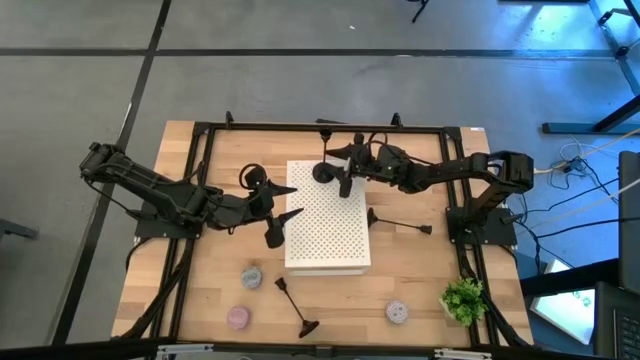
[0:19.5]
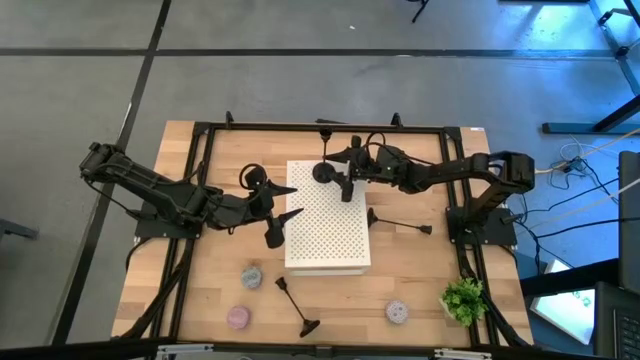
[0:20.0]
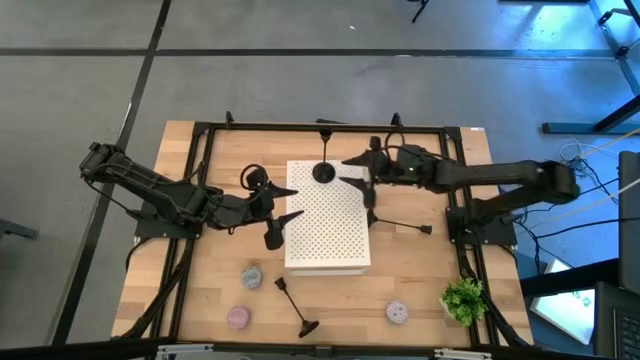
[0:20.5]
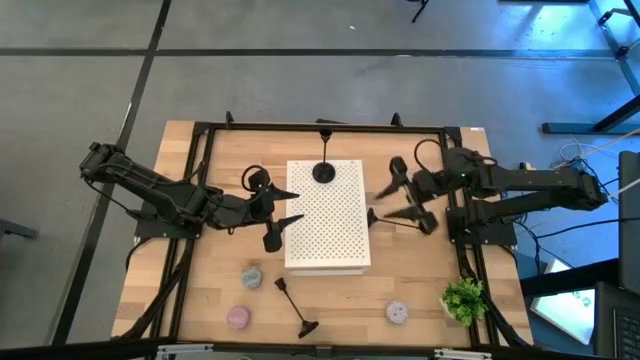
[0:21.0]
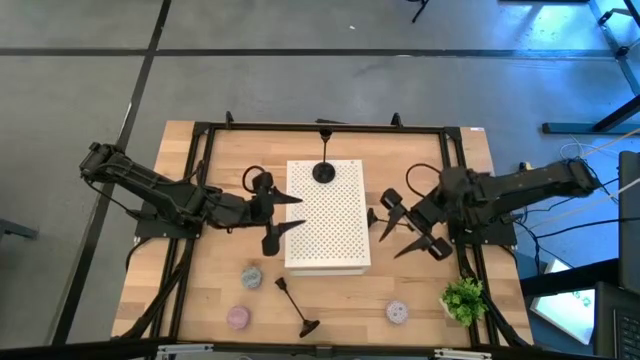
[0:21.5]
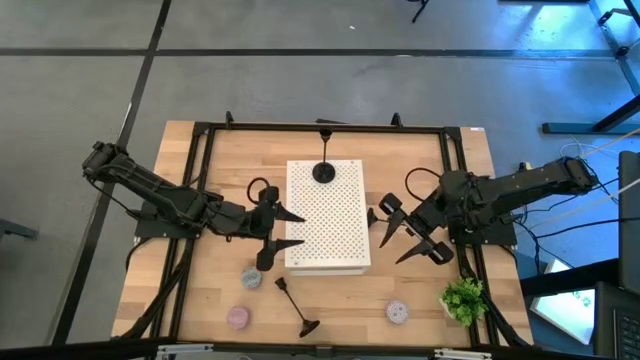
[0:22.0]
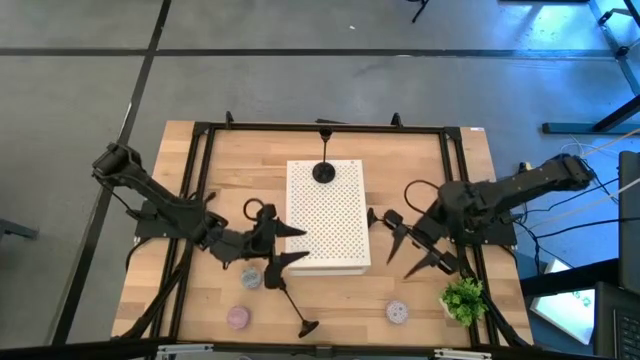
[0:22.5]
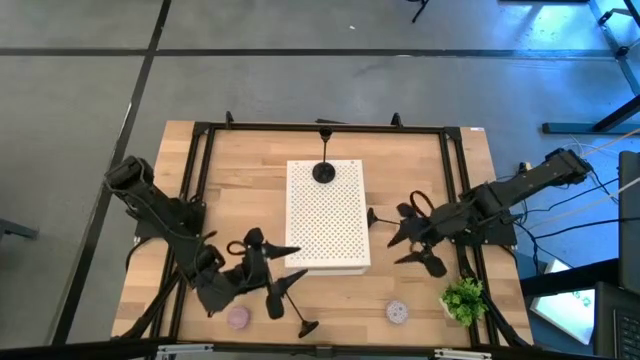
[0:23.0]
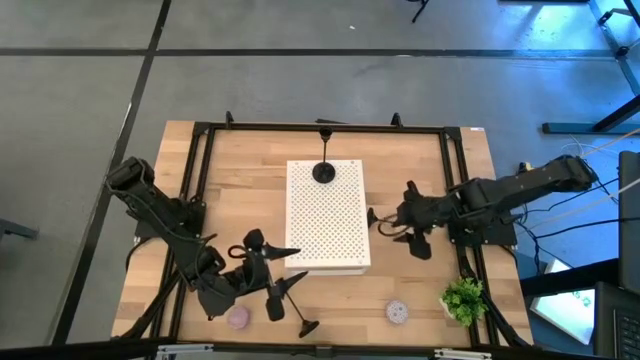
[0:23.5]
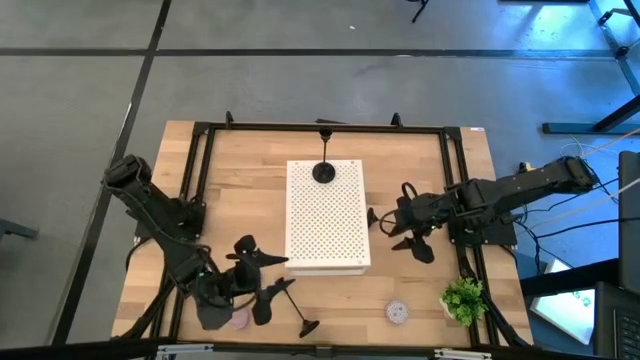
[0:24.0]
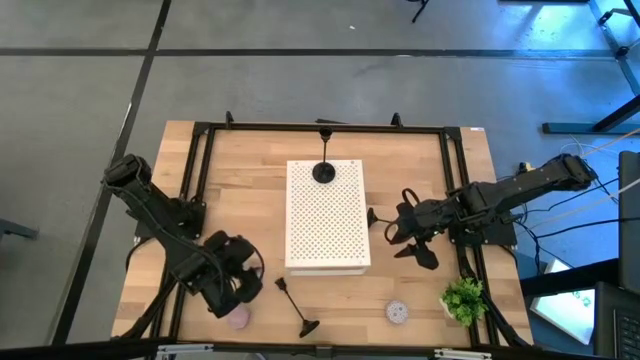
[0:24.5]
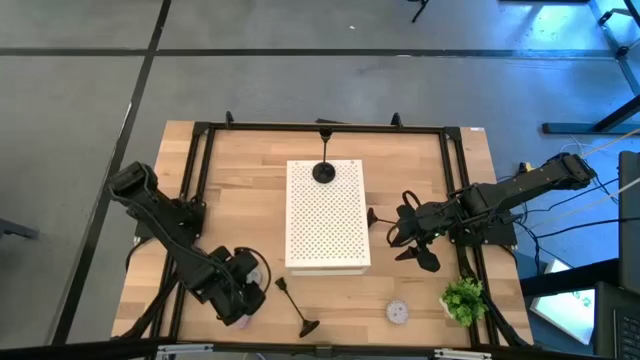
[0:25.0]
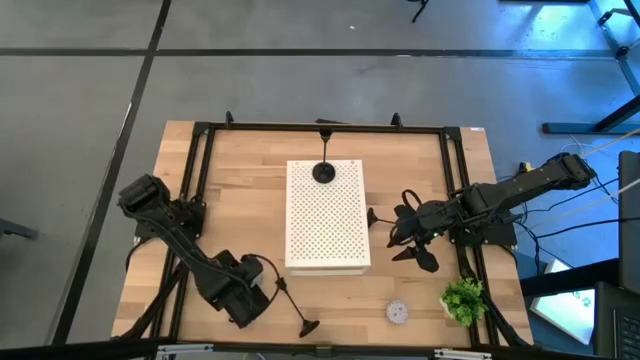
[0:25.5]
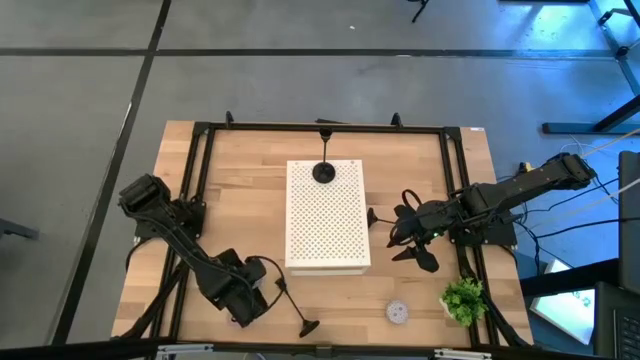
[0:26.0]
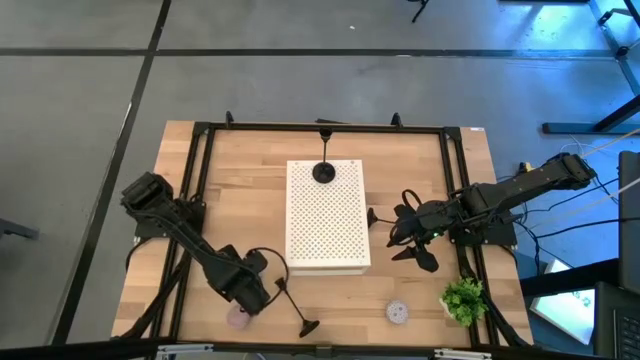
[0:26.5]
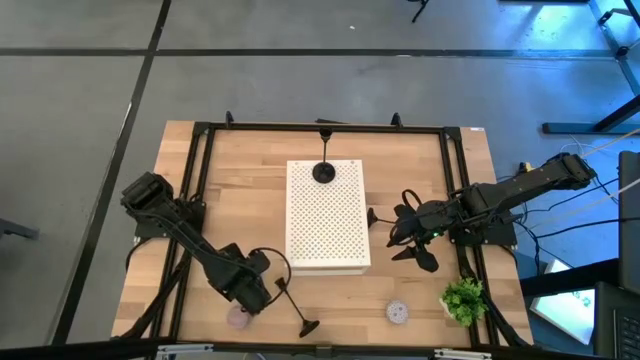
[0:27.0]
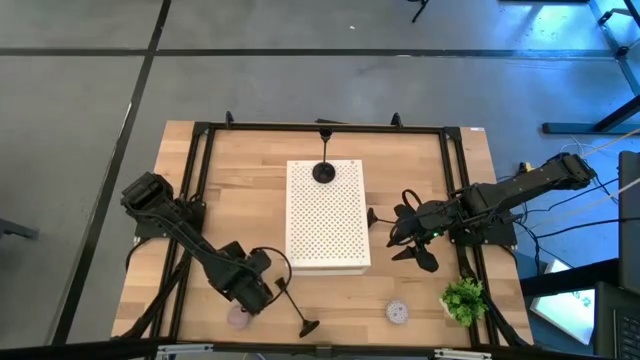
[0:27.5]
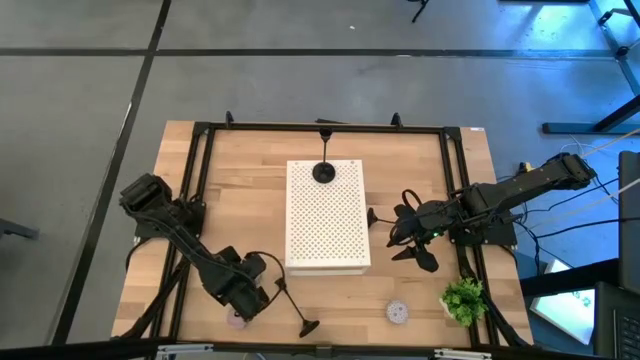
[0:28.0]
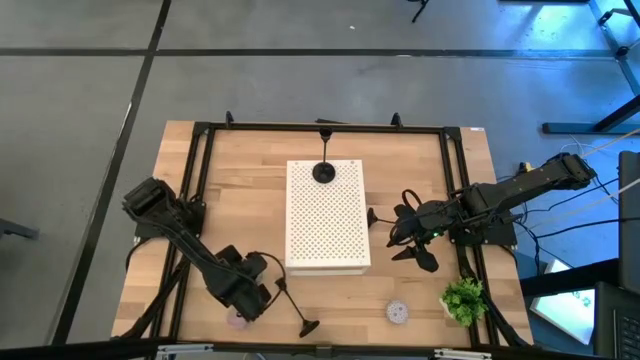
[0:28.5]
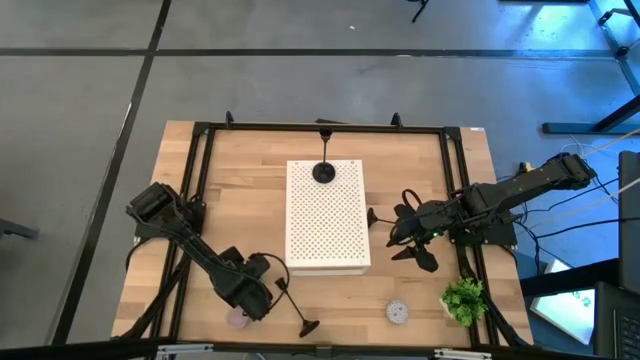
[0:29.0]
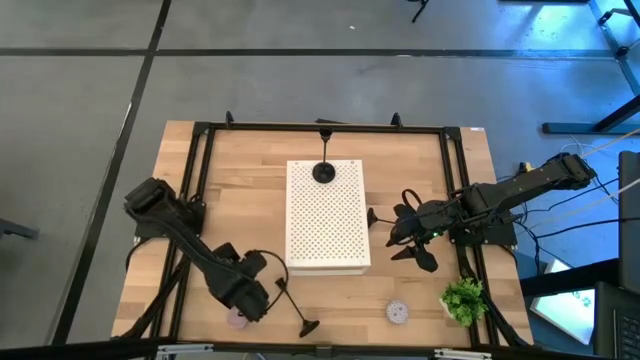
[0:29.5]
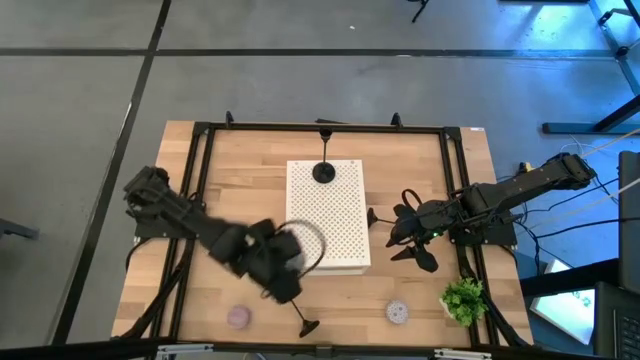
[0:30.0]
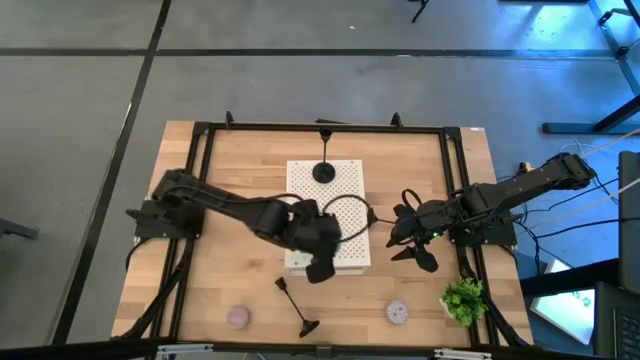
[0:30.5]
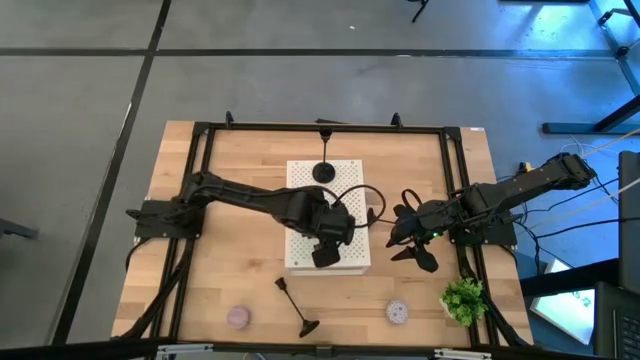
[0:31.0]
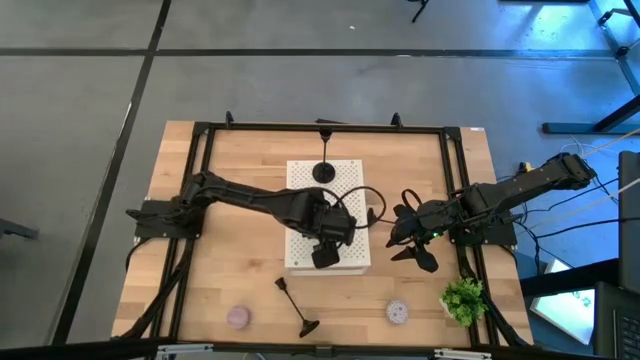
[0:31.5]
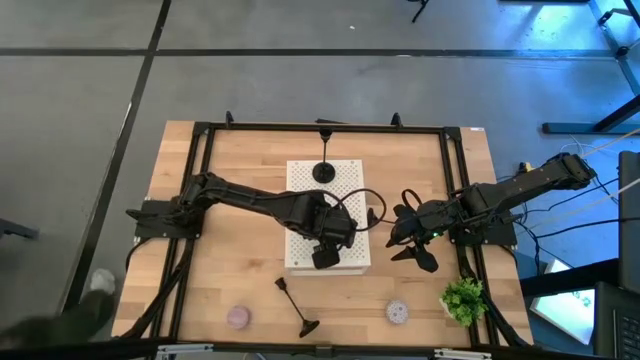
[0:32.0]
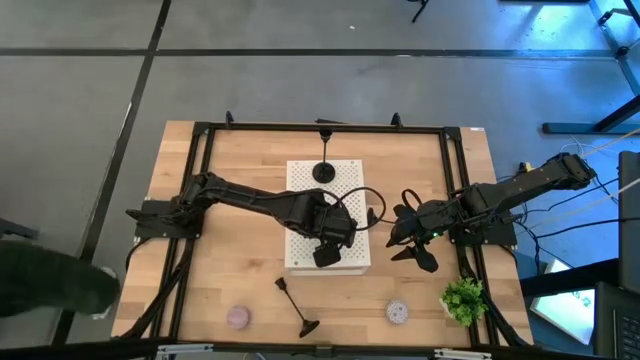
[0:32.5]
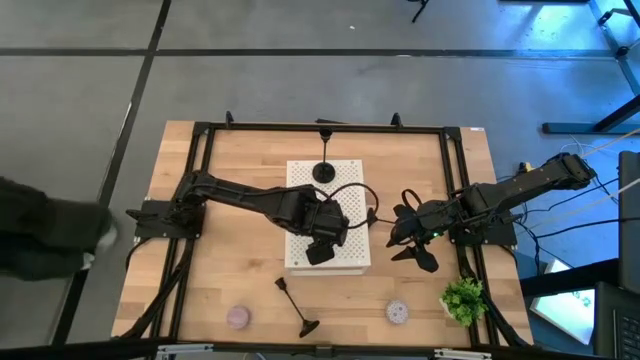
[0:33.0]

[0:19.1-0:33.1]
Task: Pick & Place candle stick holders
Put the top left blue patterned scented candle on the shelf

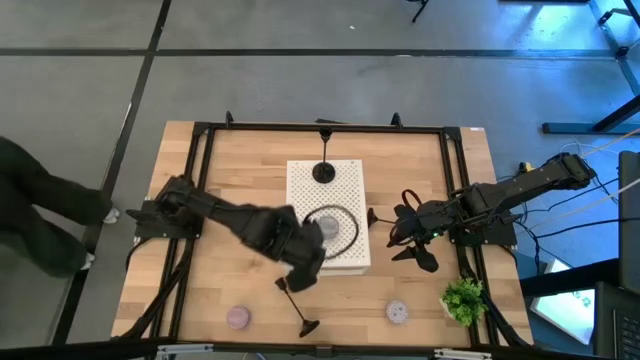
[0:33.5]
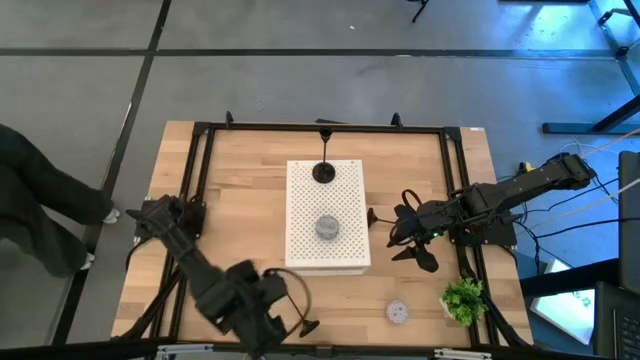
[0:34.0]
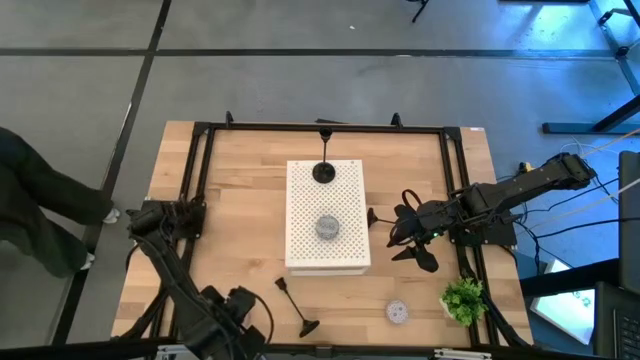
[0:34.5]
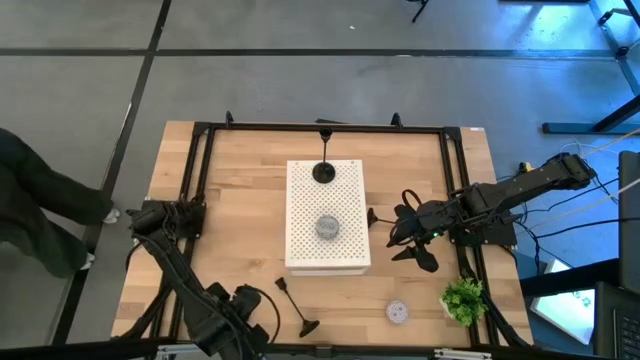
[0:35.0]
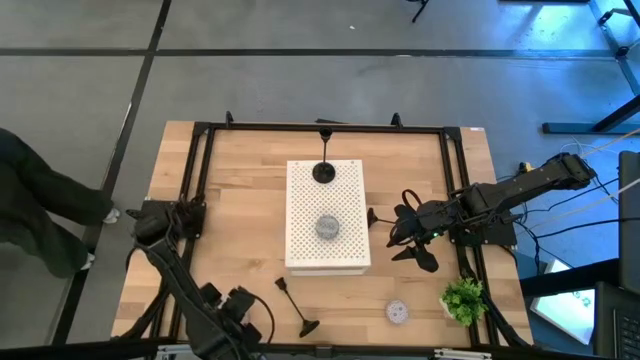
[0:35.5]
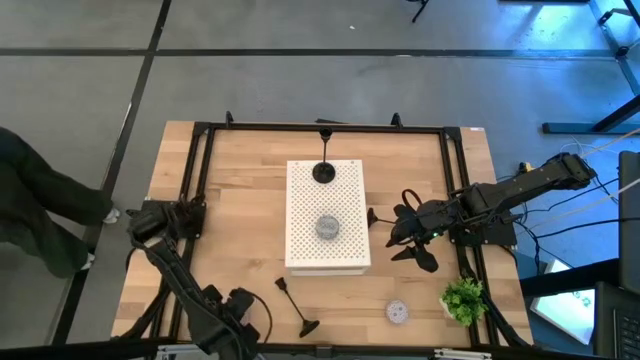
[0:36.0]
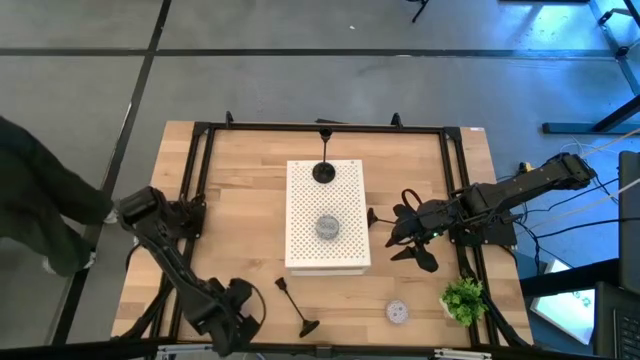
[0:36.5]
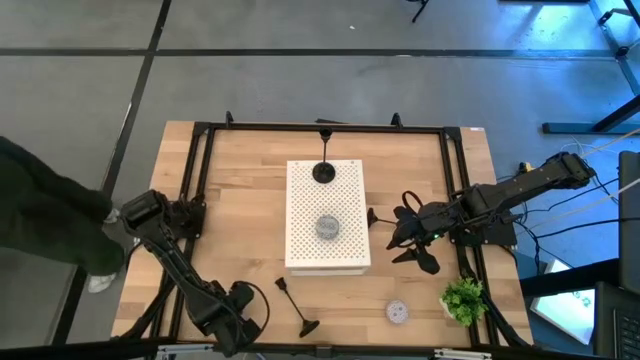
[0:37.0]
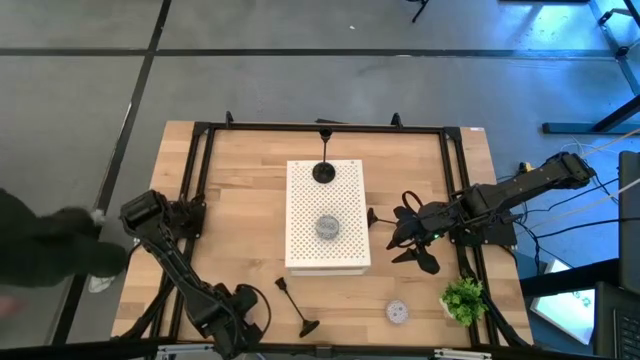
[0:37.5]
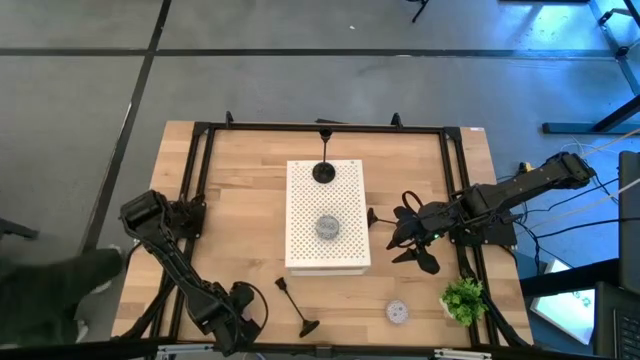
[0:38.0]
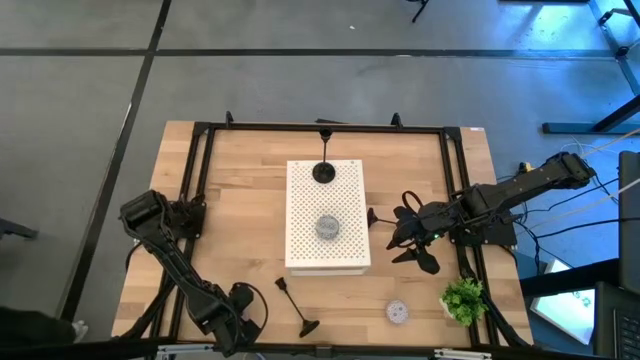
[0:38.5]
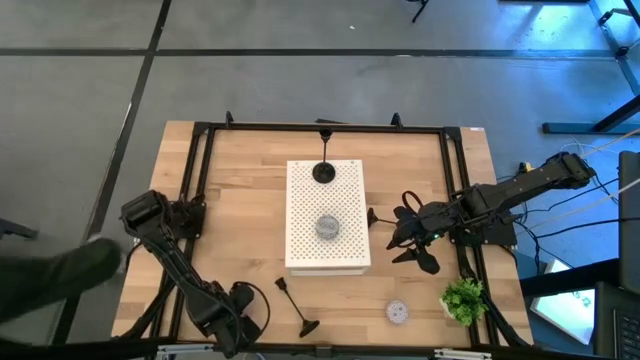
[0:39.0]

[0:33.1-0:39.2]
Put the left pink patterned scented candle on the shelf

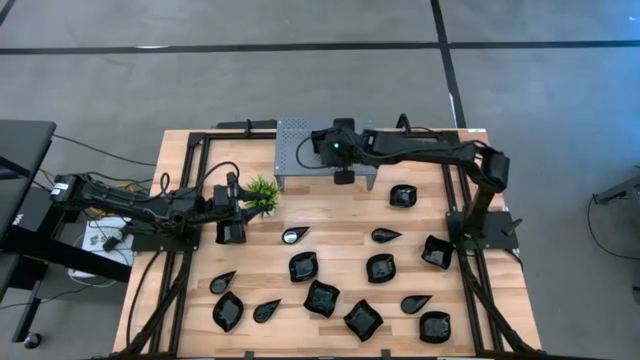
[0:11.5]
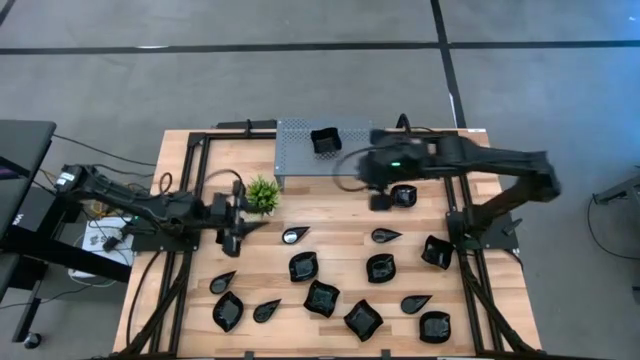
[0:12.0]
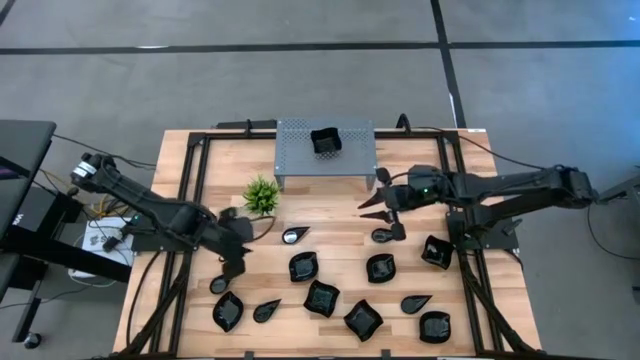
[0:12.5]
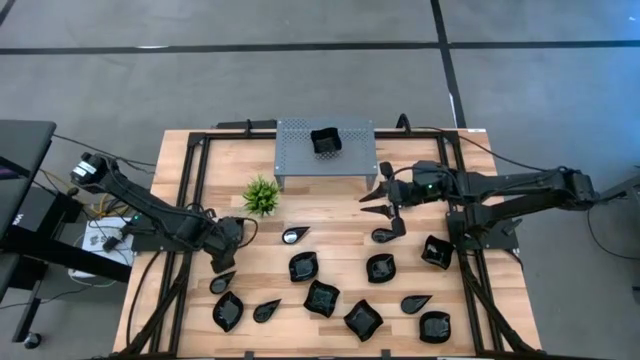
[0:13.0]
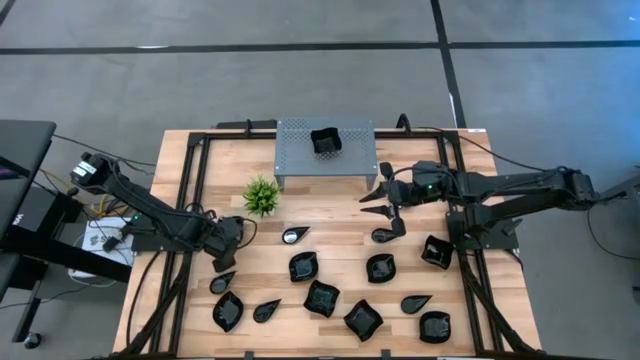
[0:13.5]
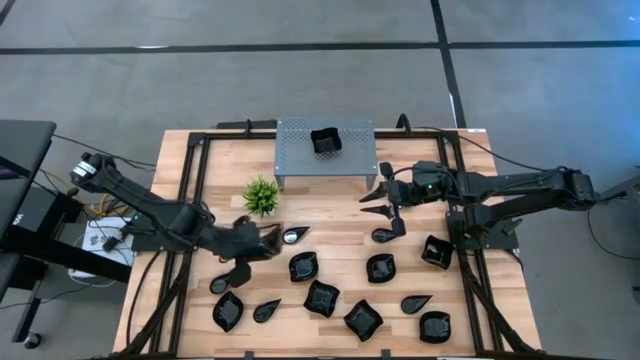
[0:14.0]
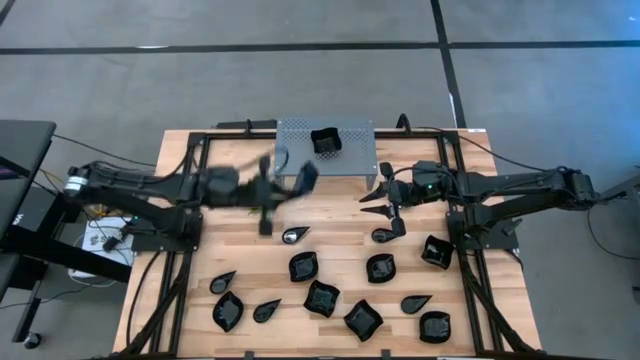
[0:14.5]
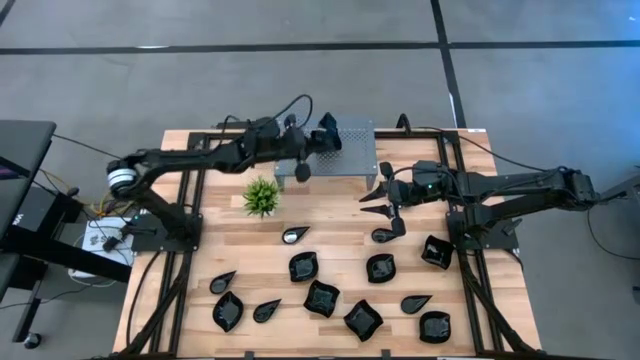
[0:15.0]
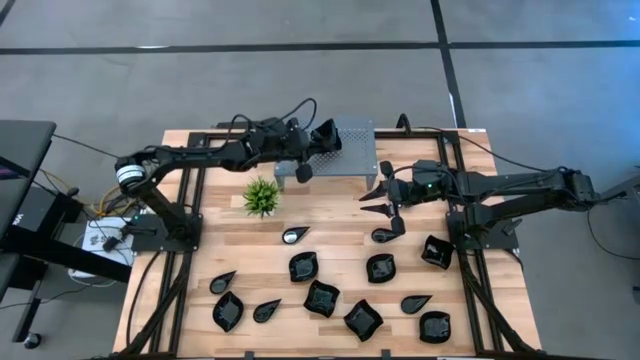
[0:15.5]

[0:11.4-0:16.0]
Task: Pick & Place Mini shaped plates
Stack the black distorted square plate on top of the black distorted square plate on the shelf
